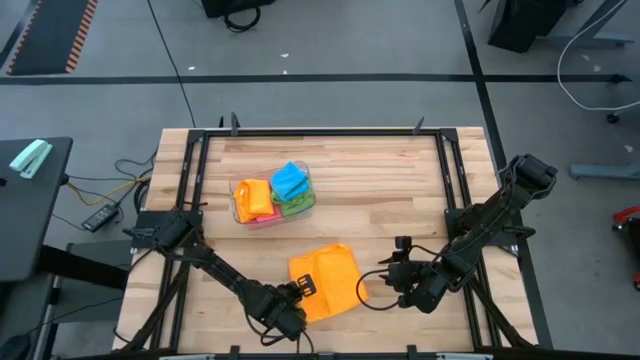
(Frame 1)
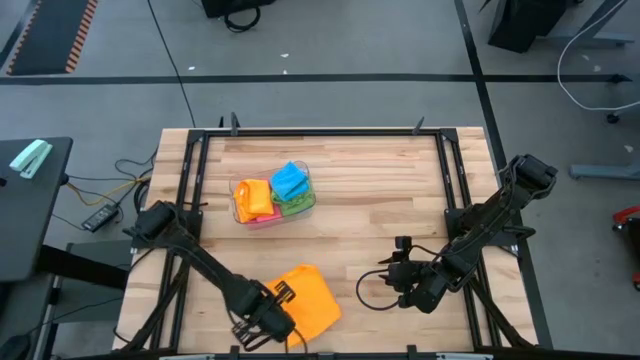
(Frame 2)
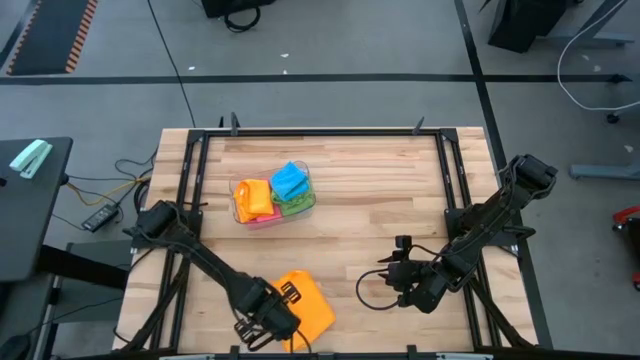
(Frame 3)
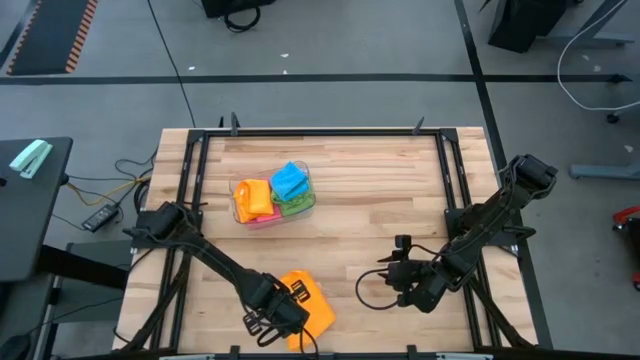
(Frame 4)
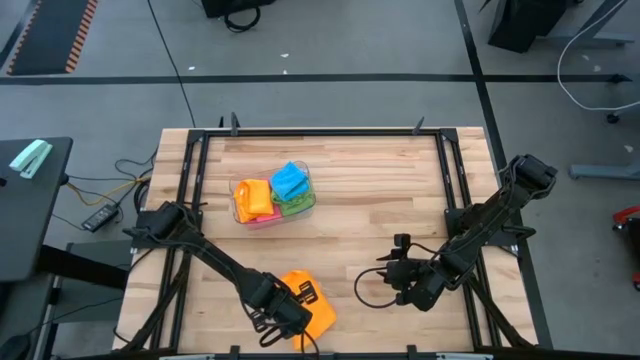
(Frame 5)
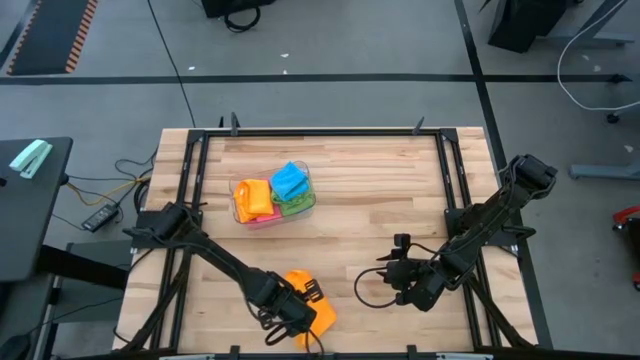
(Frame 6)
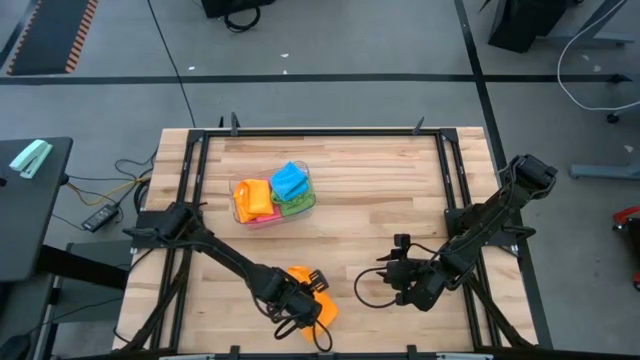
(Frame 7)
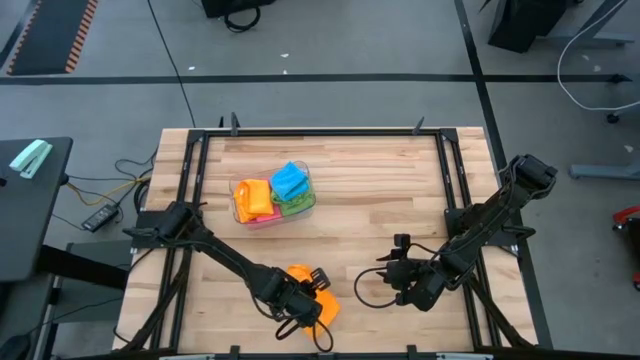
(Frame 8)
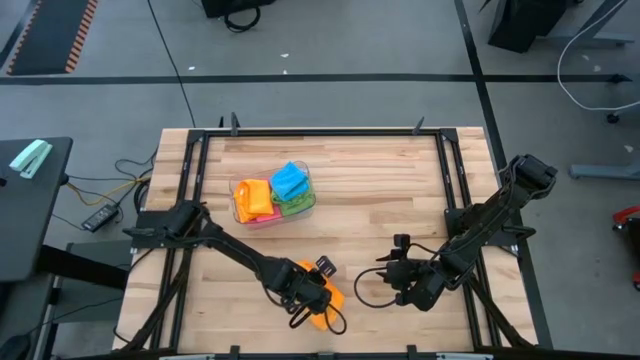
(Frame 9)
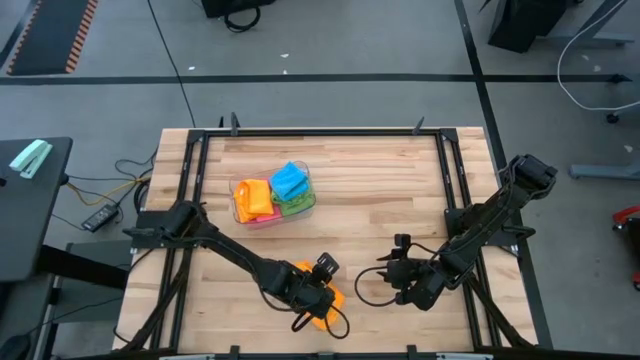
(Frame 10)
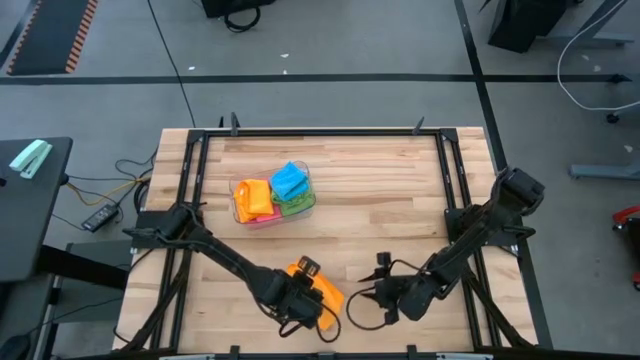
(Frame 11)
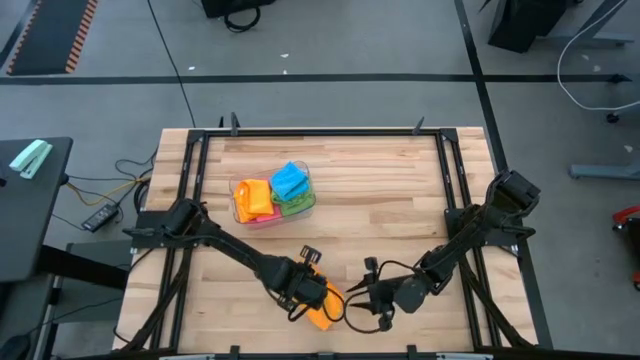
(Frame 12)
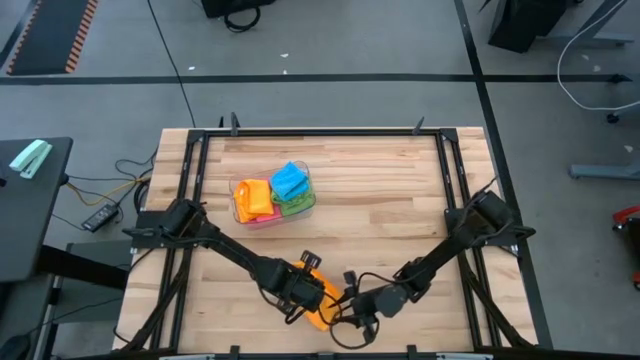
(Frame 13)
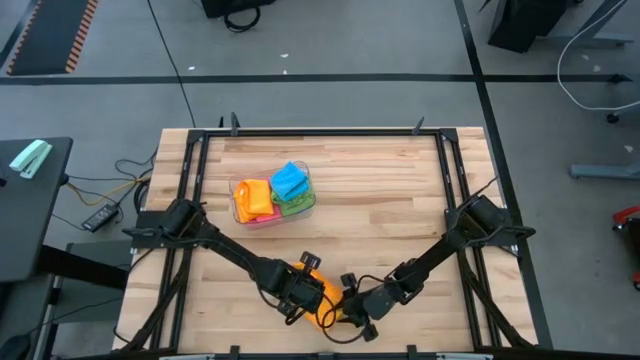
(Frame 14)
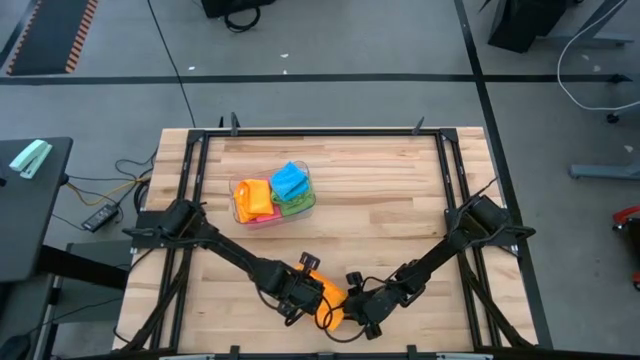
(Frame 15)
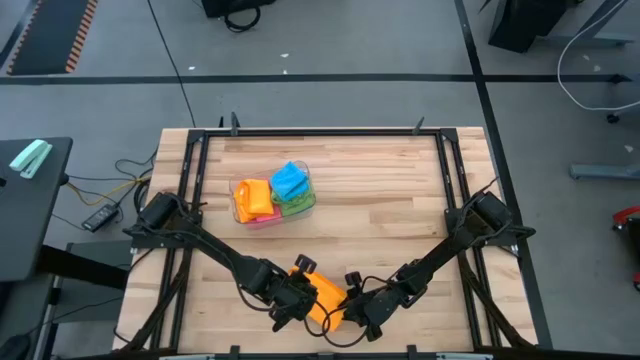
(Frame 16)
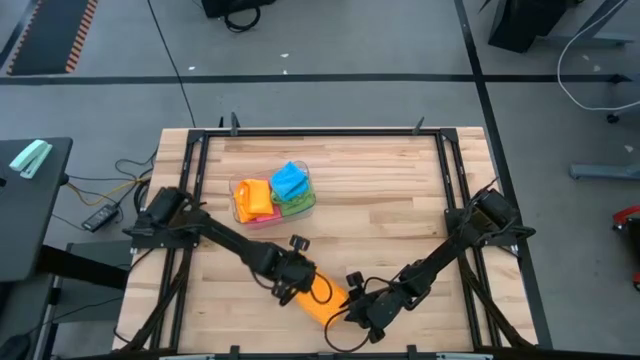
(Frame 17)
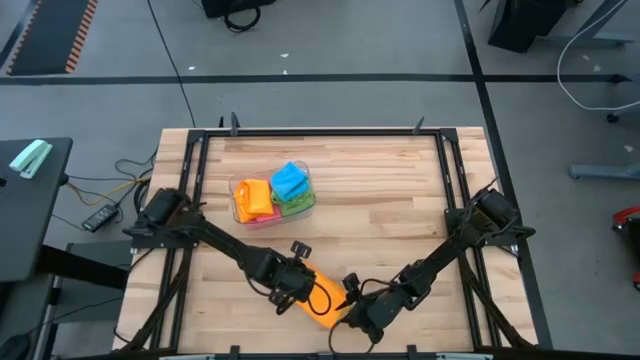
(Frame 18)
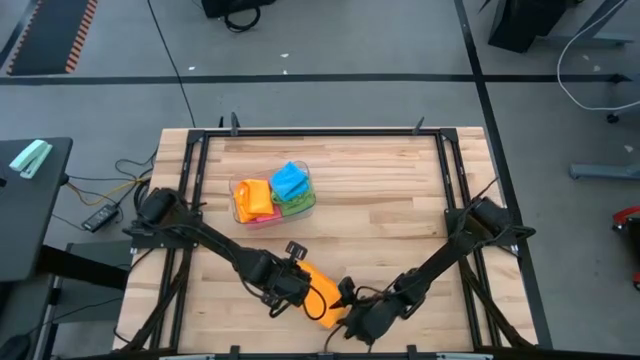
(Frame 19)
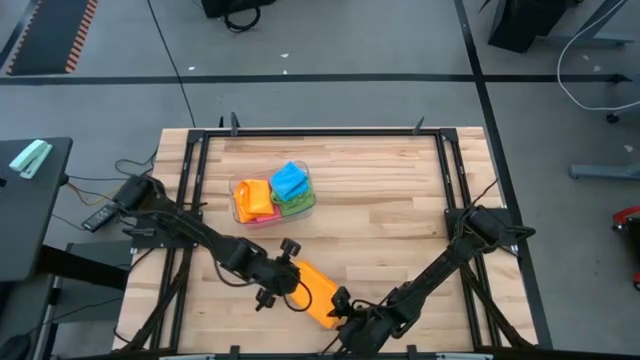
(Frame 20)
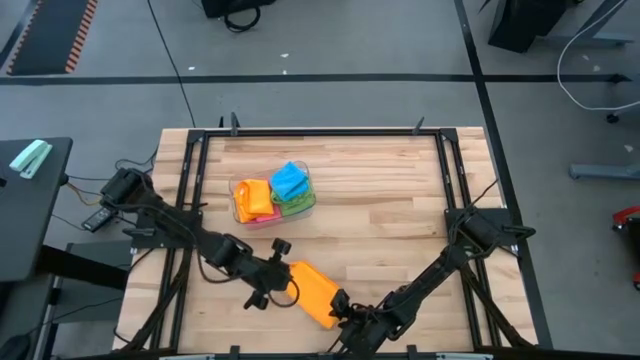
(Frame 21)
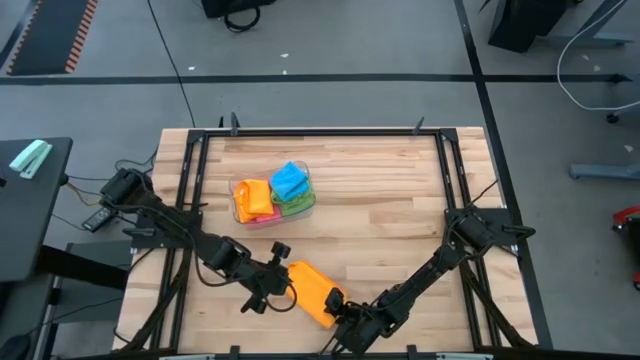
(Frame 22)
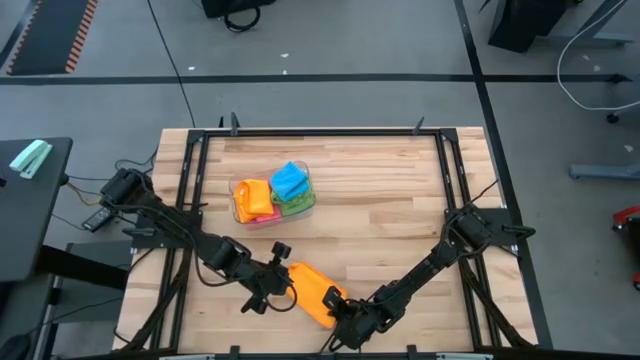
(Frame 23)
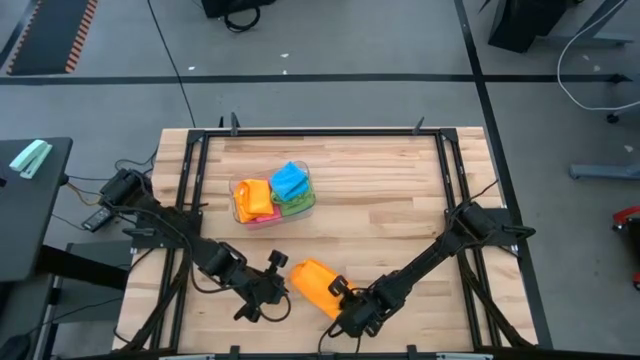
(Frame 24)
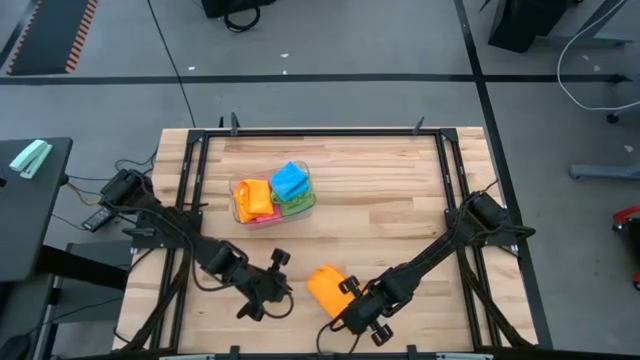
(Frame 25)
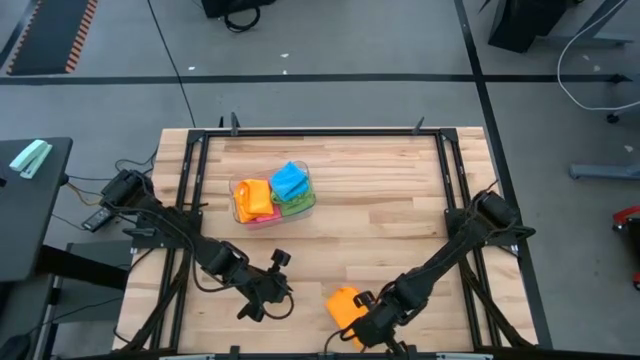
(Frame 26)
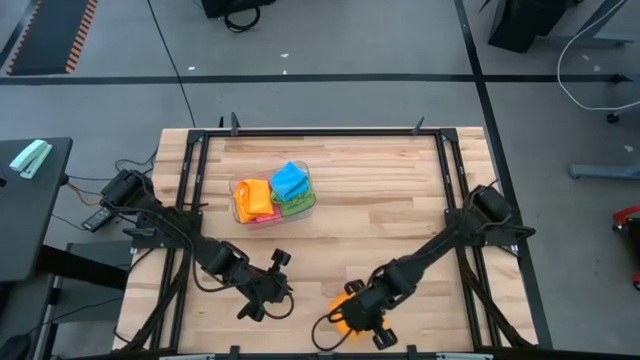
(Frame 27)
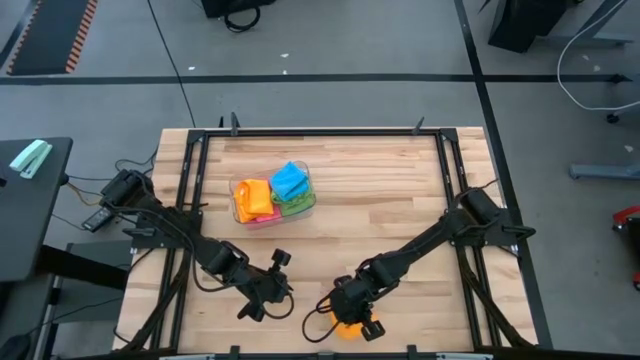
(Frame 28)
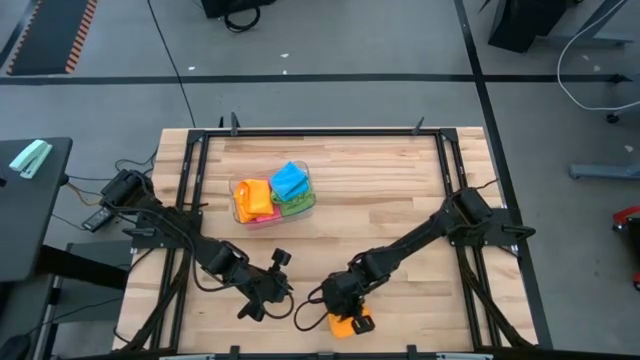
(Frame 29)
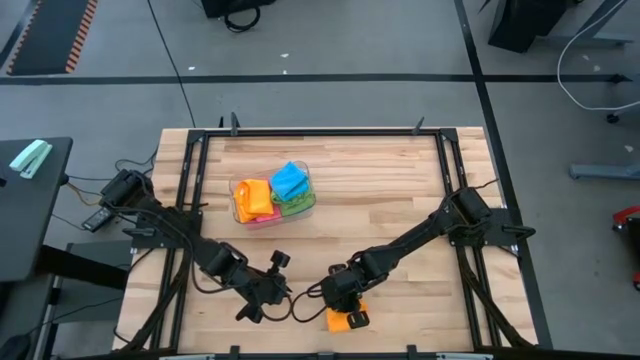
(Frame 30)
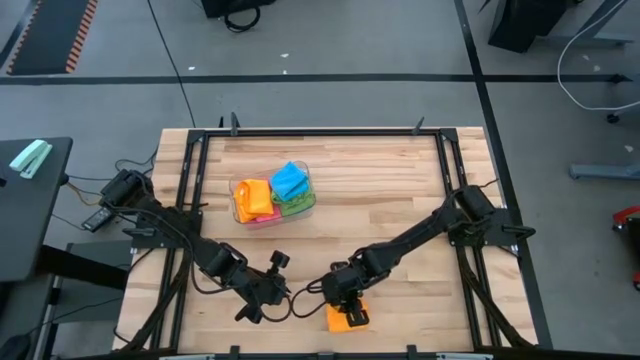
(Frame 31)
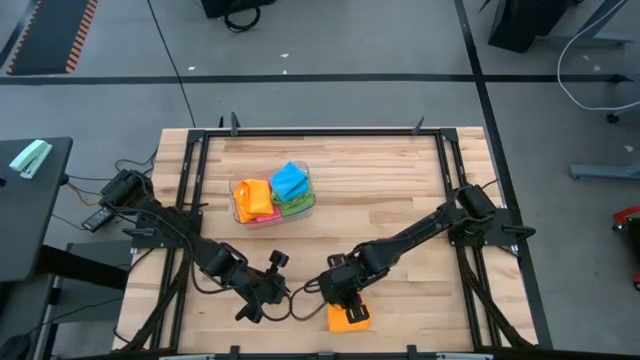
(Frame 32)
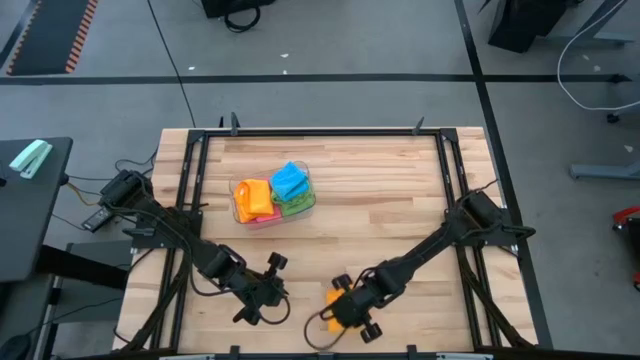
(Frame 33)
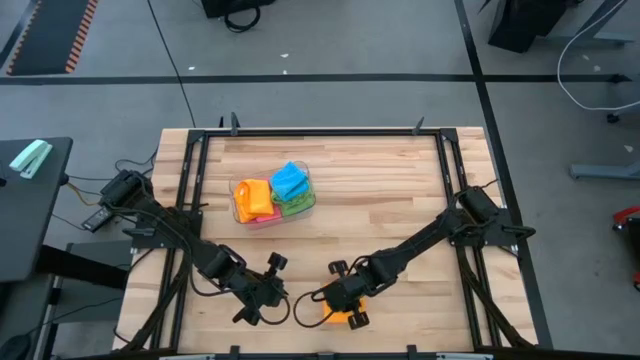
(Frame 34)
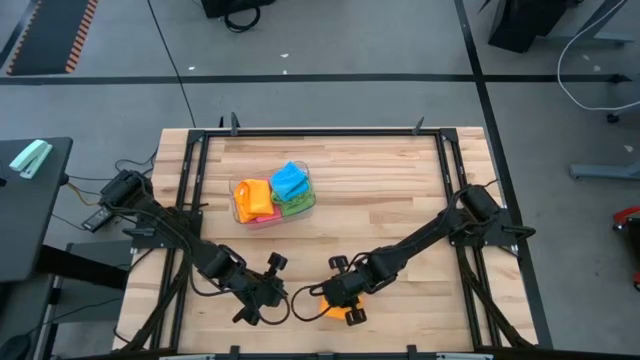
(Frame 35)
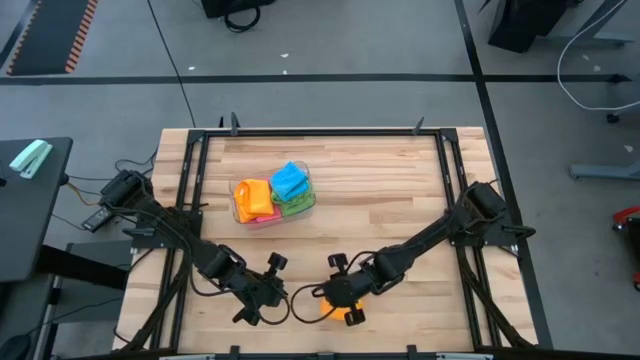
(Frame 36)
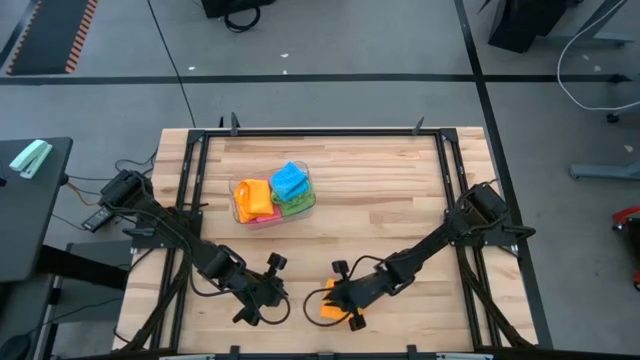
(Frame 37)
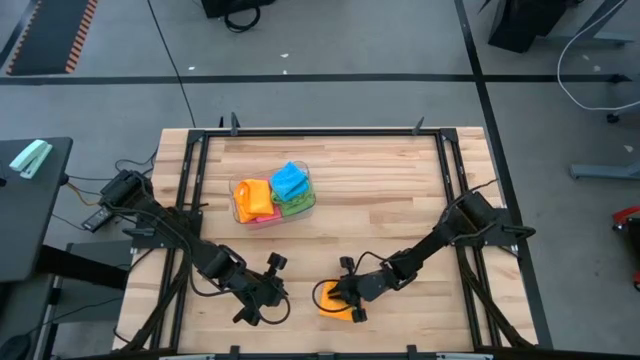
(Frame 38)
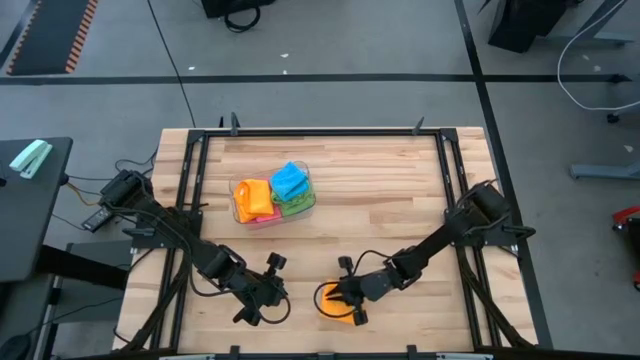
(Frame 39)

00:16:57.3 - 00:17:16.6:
Task: Fold microfiber towels
Fold the yellow microfiber towel

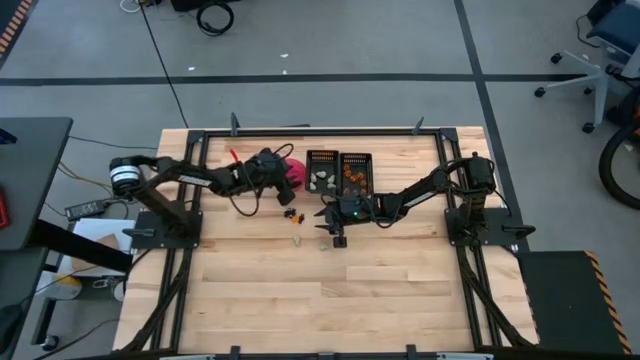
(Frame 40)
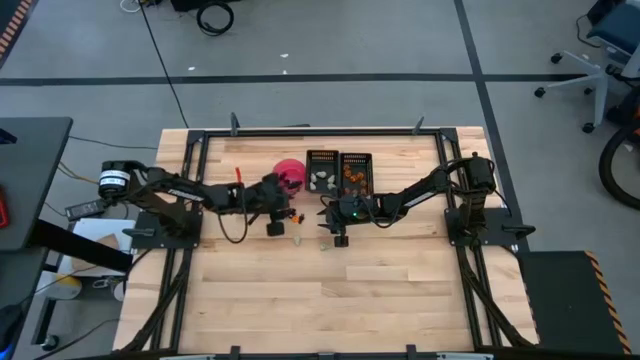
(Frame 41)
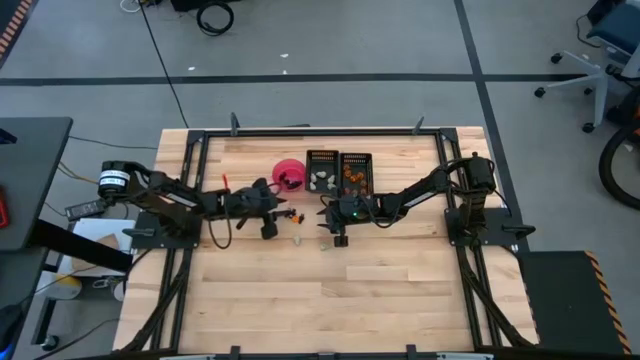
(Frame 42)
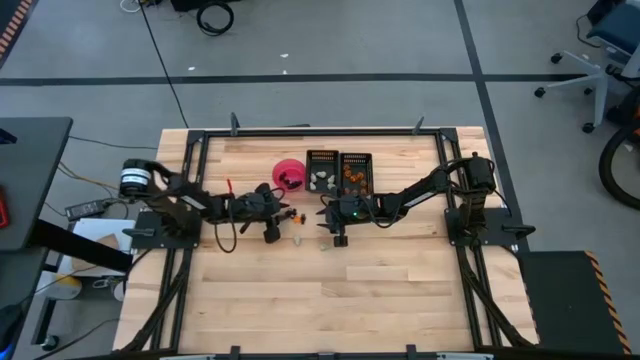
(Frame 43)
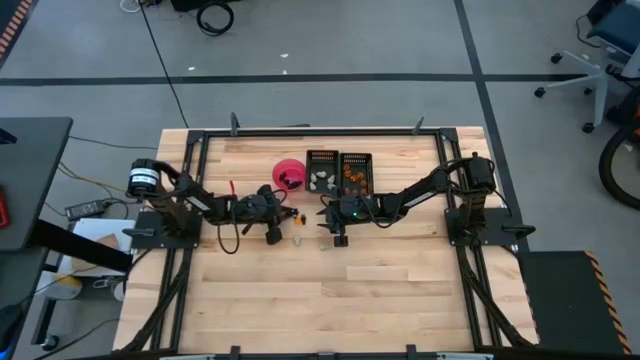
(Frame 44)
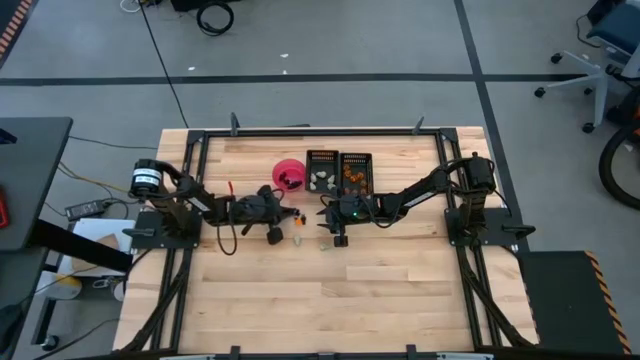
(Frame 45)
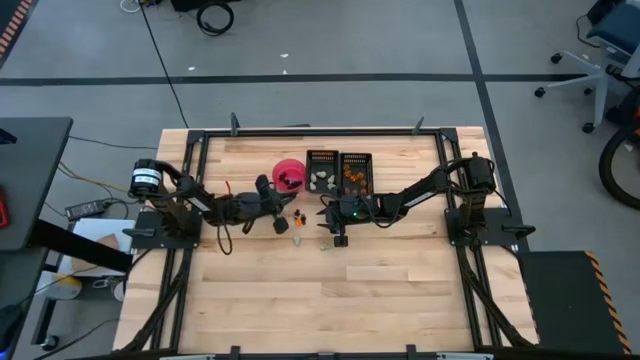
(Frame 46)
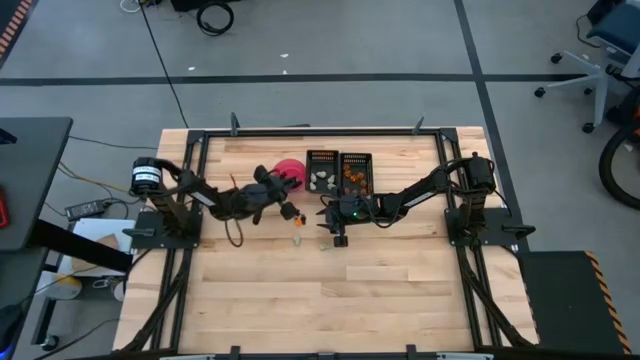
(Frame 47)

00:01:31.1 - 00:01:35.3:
Task: Sort Halloween decoration
Put the black skeleton toy into the red bowl
